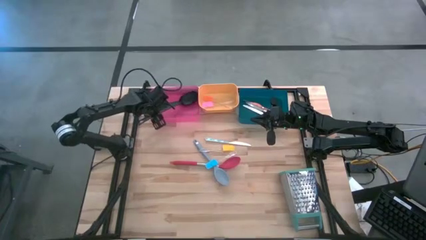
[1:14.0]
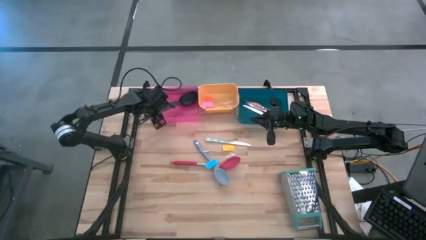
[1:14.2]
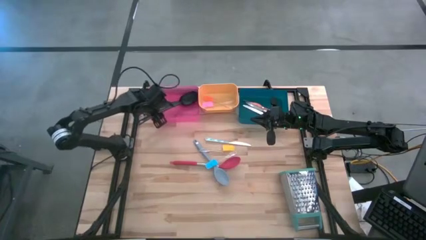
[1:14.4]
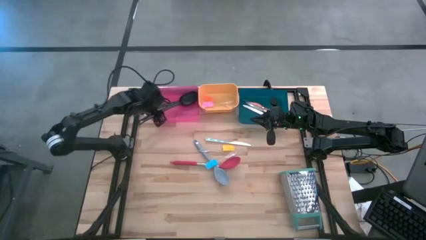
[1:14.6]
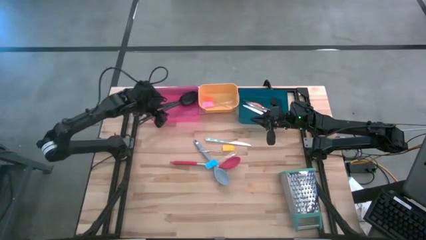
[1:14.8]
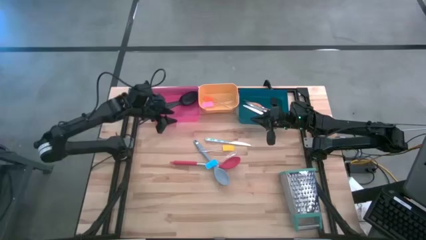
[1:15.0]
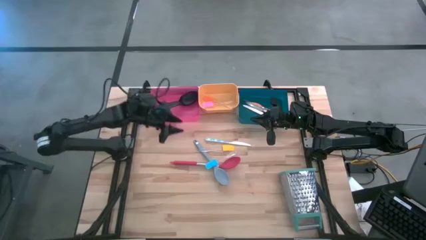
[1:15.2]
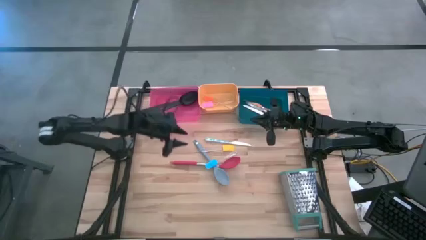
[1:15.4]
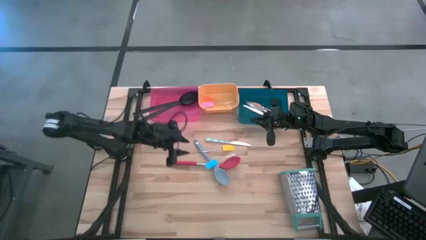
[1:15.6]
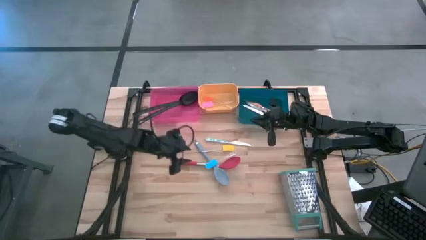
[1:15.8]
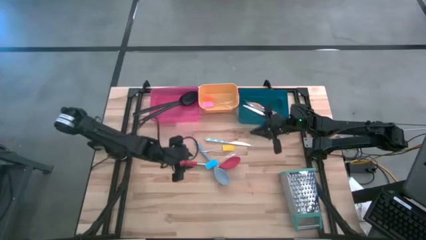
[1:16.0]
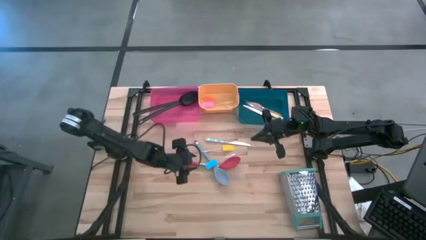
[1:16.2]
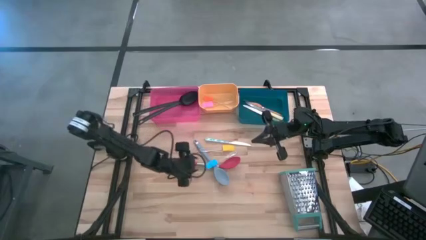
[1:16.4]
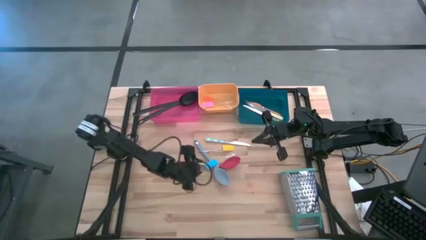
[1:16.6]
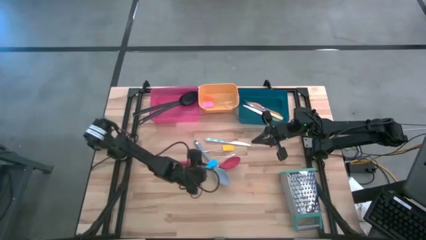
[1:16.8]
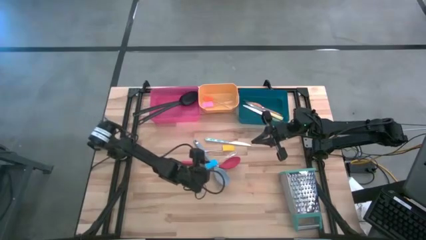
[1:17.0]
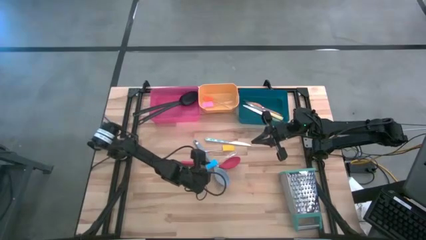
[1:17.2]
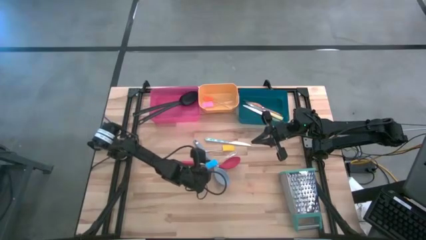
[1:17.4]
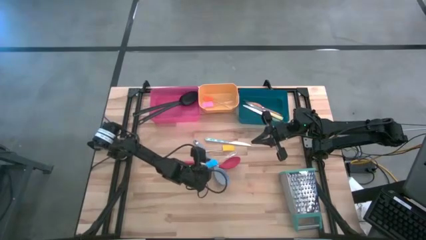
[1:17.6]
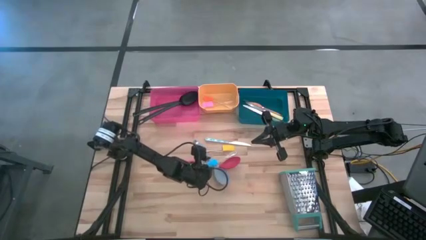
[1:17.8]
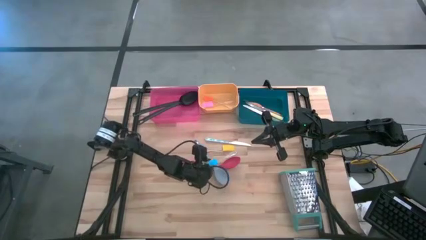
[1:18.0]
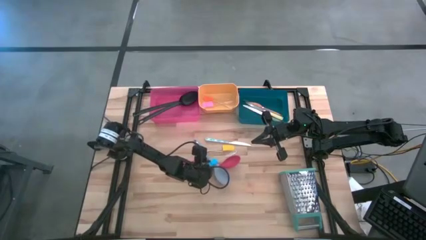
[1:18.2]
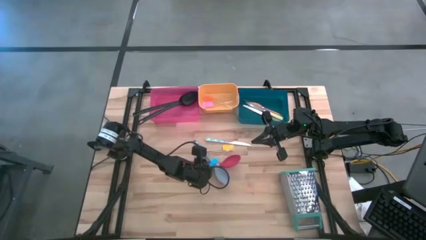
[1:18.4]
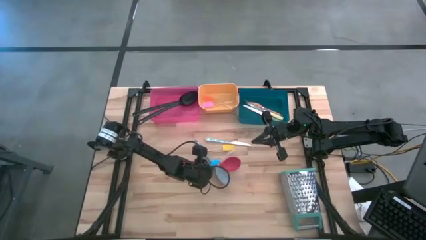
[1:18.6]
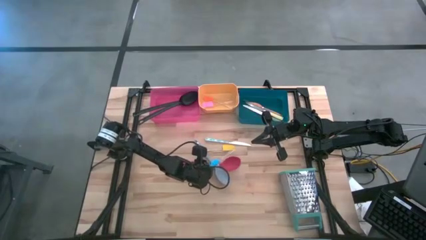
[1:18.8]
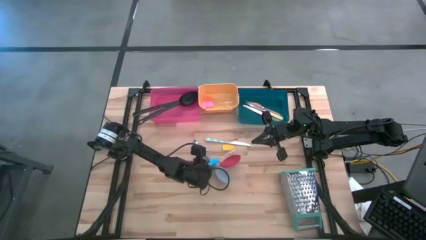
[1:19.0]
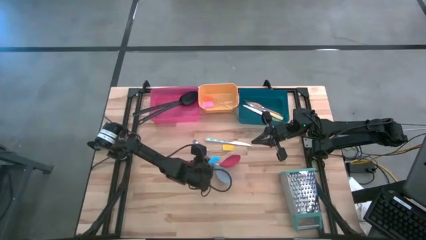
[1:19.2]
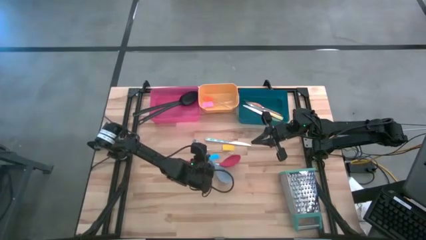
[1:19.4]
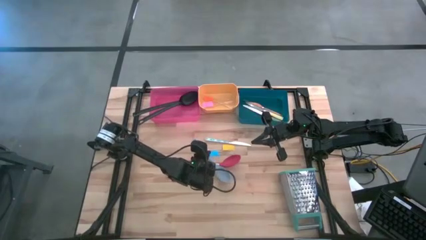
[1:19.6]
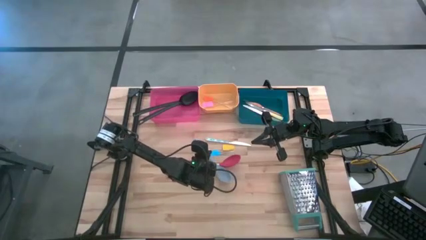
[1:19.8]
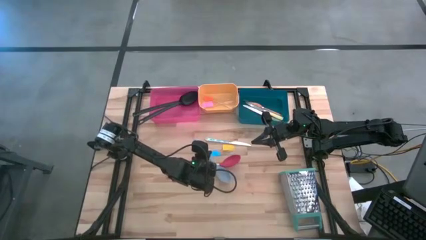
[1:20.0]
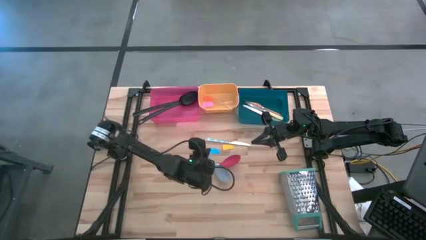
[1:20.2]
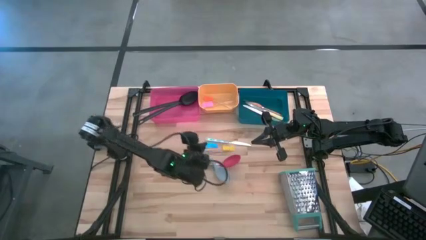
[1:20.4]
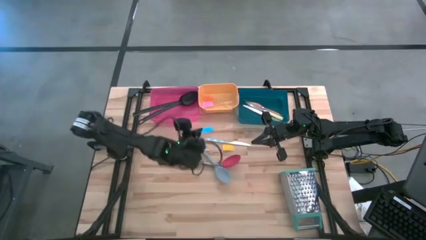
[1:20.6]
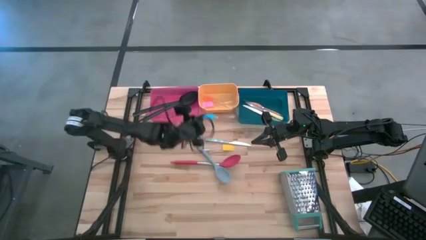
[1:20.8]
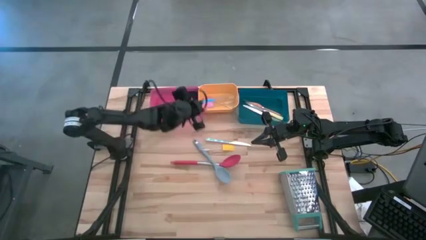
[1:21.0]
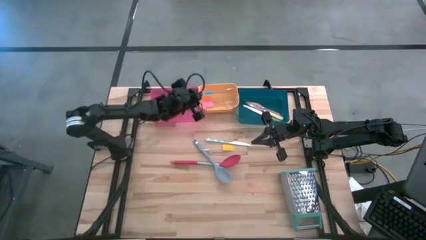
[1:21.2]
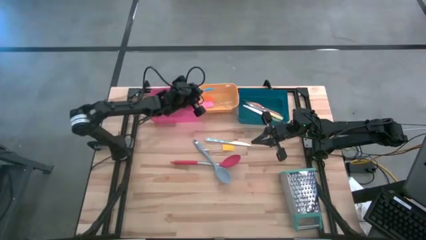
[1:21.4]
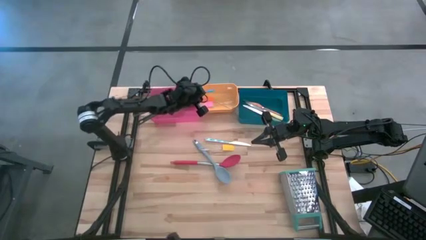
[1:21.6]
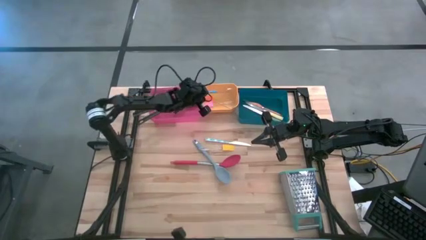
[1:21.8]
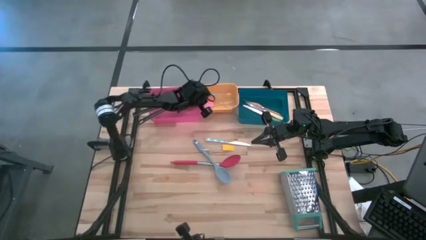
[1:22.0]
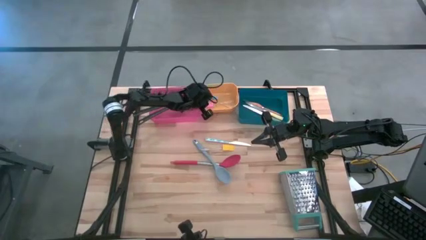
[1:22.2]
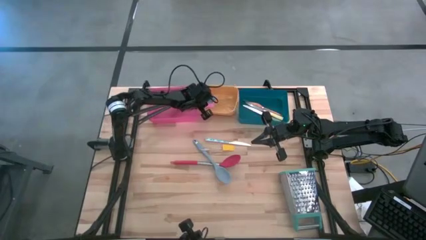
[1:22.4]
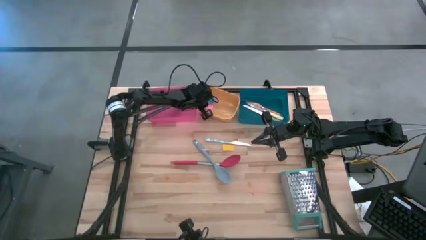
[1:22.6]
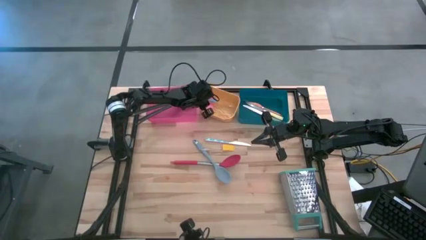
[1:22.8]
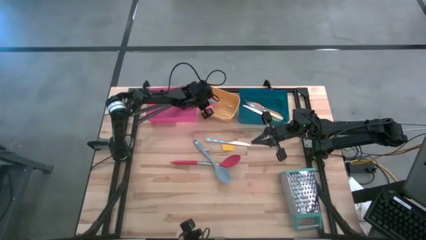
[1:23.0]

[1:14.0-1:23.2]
Task: Pick & Place Kitchen Items
Put the blue spatula into the yellow bin

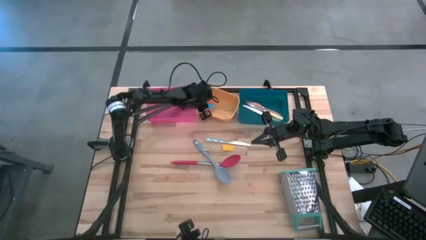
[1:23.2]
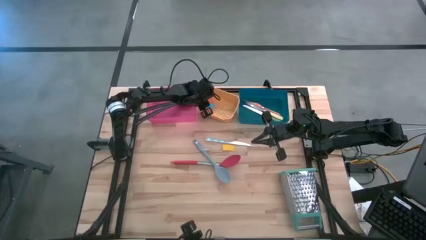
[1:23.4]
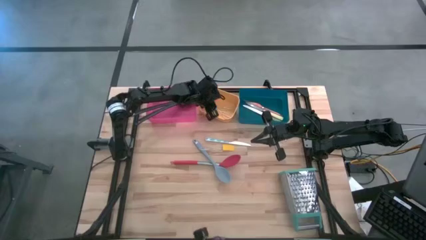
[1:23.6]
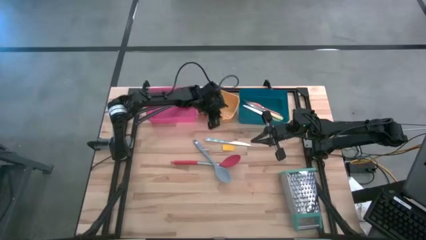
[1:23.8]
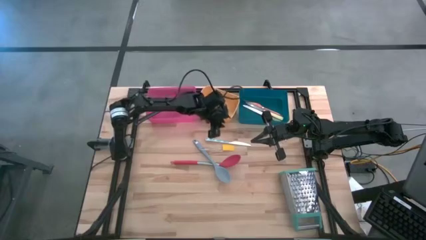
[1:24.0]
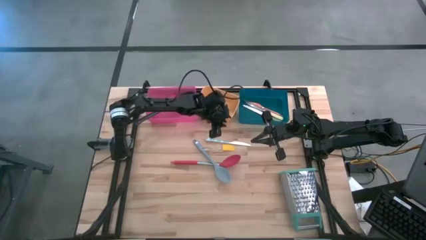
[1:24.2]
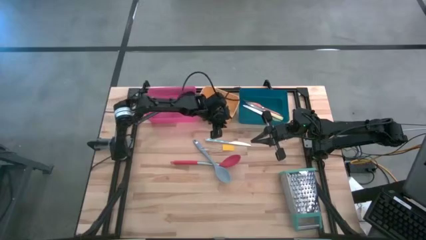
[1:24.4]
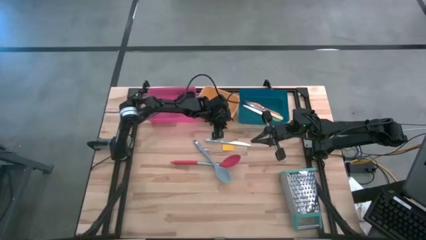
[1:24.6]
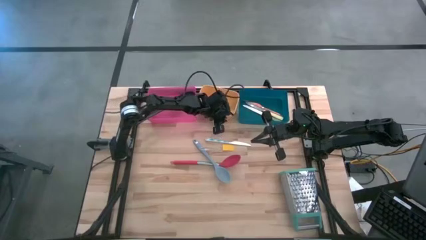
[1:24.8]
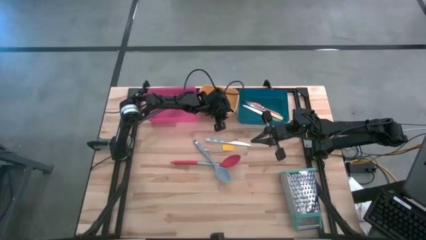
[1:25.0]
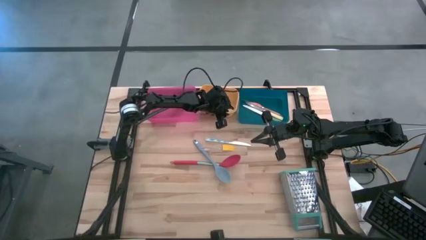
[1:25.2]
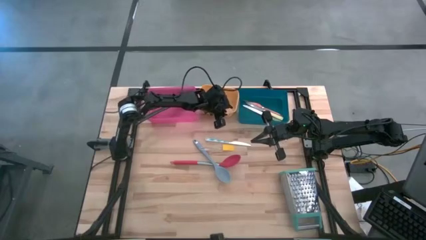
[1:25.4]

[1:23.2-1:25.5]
Adjust the yellow bin

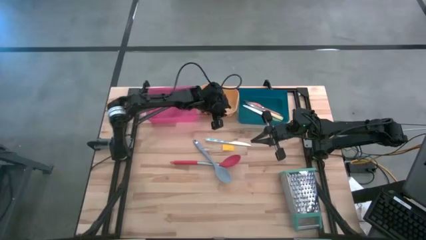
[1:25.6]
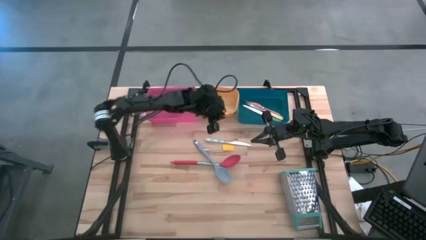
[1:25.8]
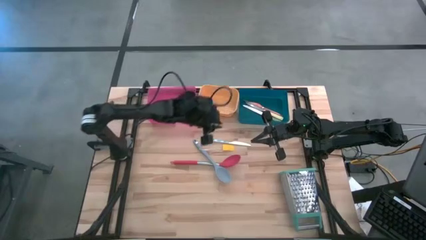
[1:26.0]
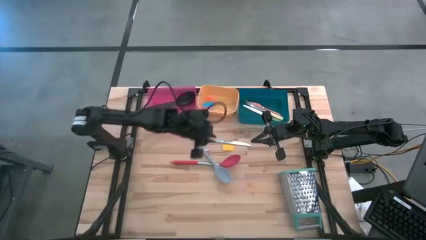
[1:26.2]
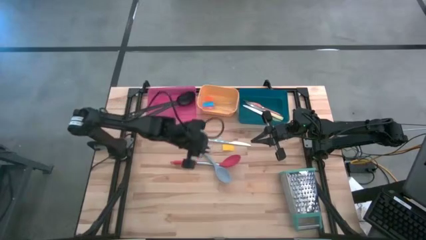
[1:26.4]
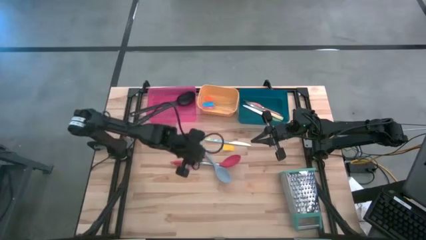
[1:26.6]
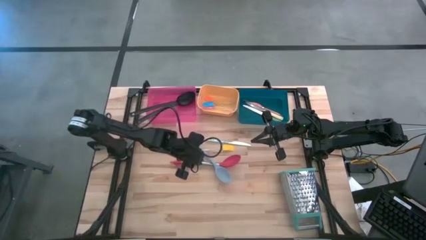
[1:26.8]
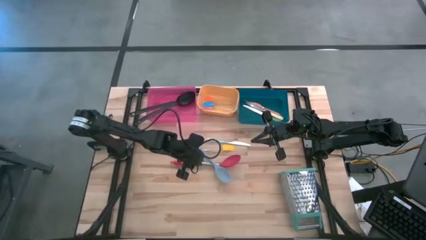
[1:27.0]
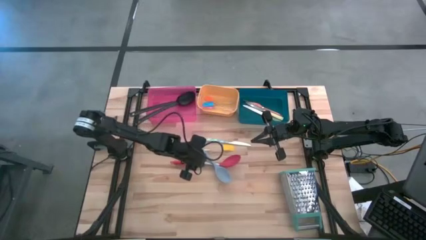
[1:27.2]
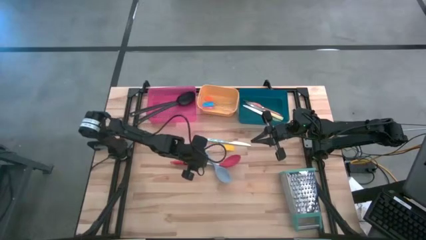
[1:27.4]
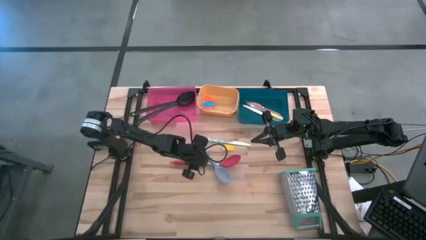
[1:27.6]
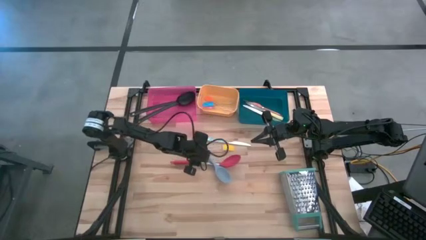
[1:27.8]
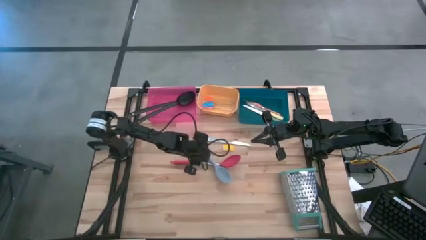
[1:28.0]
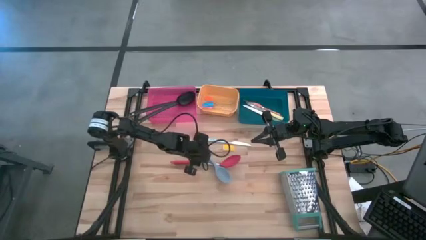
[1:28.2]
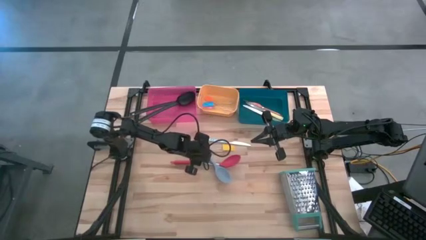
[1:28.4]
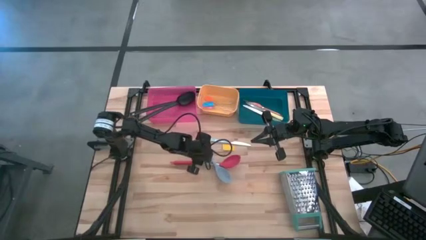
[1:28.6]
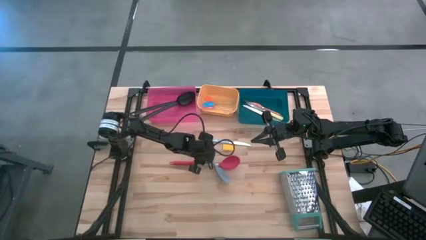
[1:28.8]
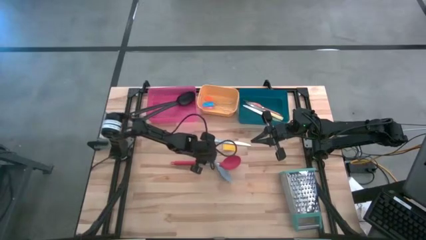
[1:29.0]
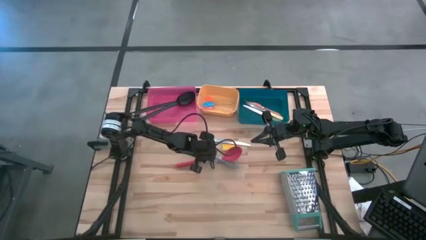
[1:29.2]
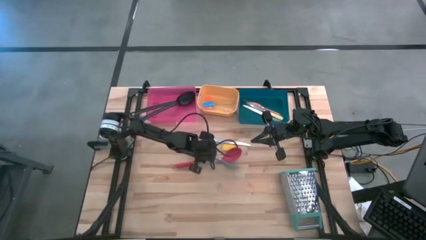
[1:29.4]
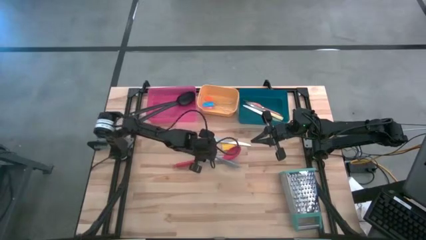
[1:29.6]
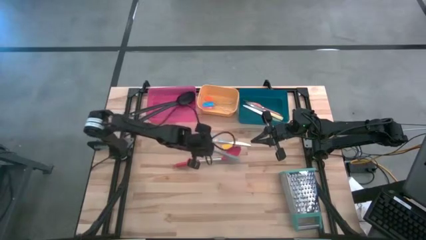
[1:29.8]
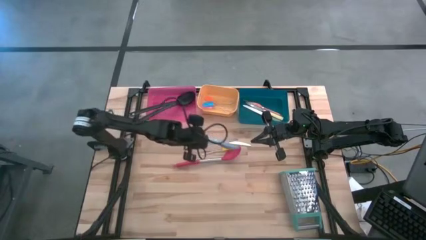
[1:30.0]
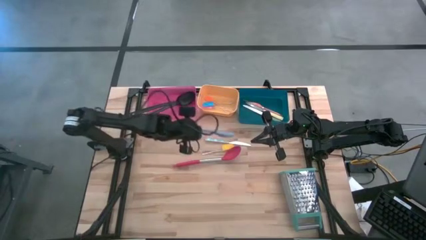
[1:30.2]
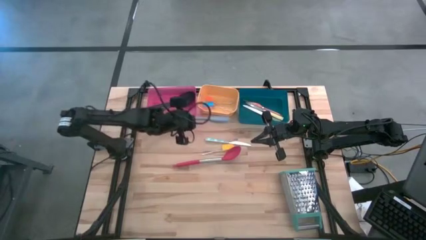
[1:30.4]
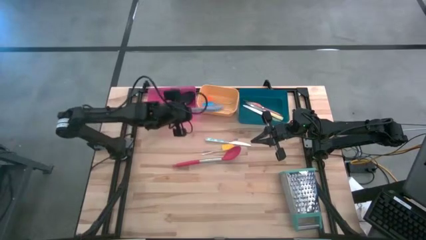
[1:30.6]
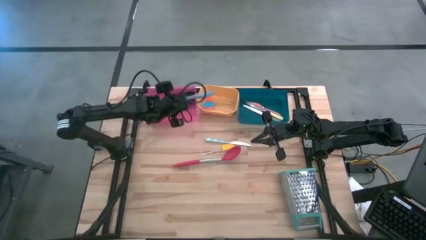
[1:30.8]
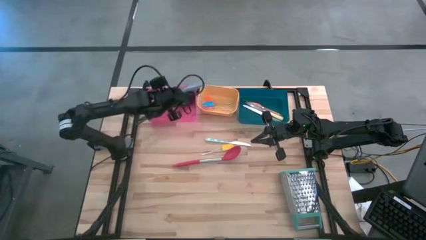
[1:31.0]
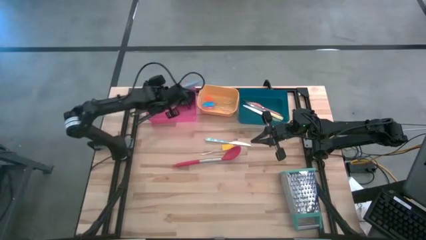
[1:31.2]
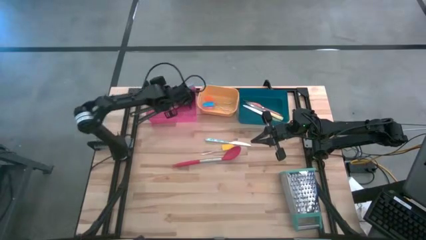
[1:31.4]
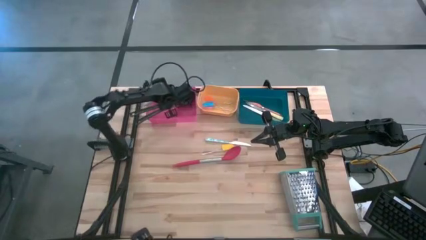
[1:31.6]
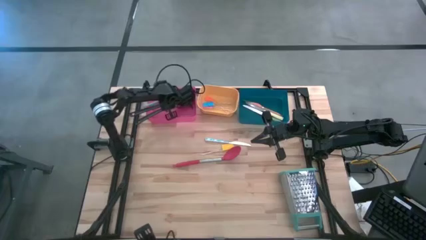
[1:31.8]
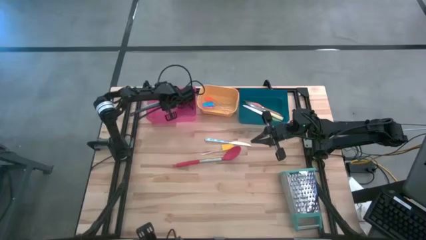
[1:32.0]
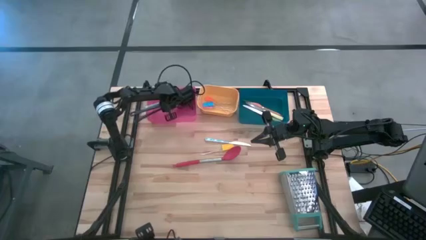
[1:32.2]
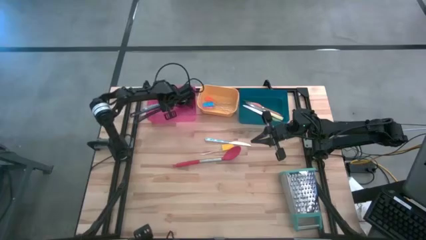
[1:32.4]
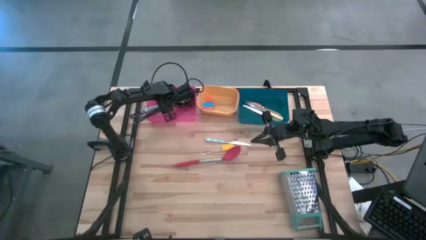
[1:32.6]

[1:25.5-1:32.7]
Put the gray spoon into the red bin
